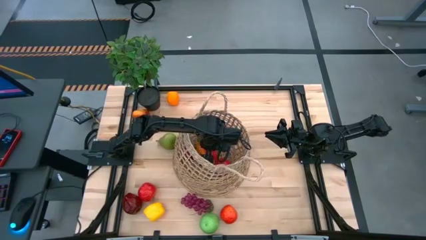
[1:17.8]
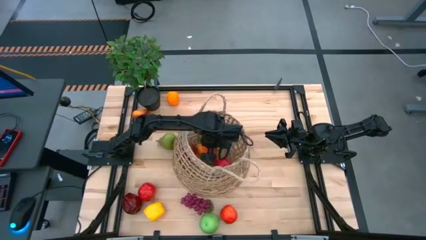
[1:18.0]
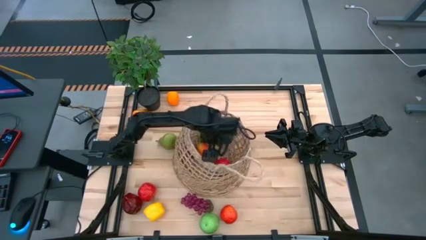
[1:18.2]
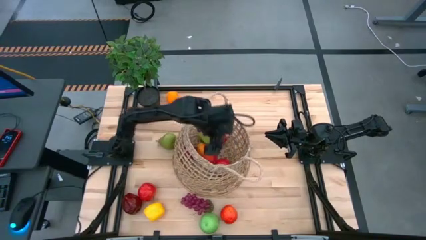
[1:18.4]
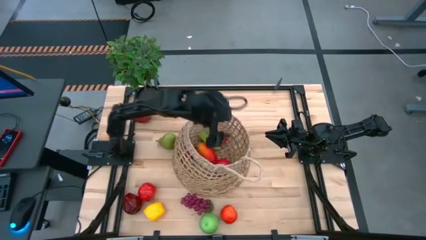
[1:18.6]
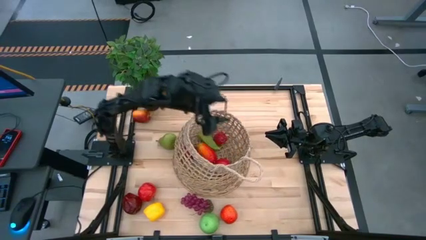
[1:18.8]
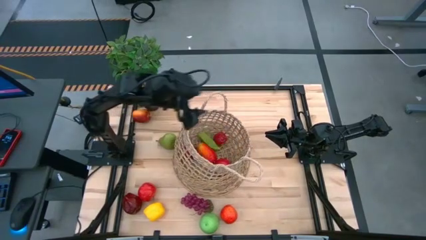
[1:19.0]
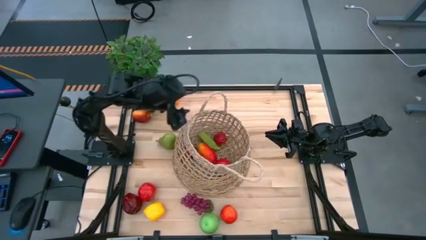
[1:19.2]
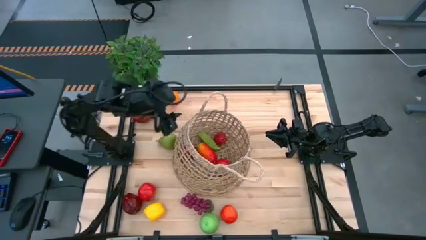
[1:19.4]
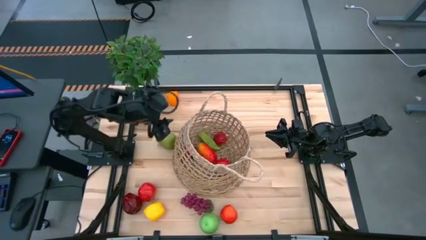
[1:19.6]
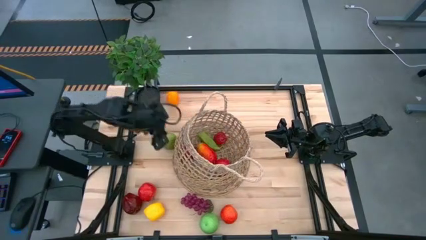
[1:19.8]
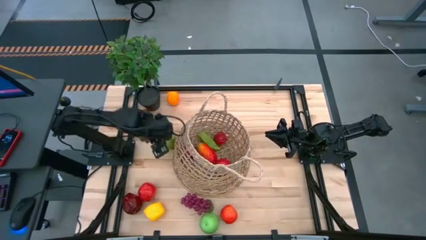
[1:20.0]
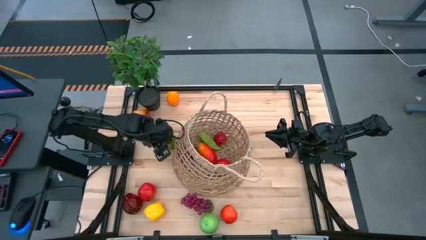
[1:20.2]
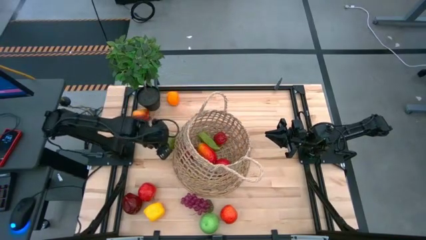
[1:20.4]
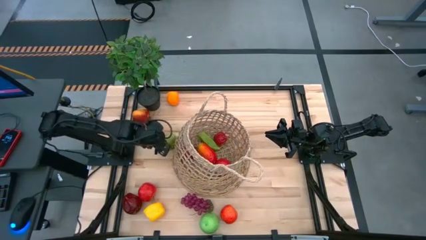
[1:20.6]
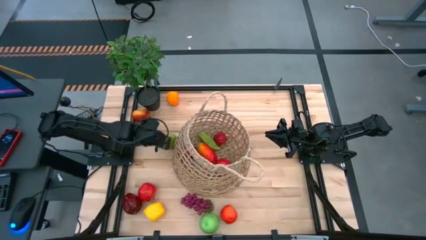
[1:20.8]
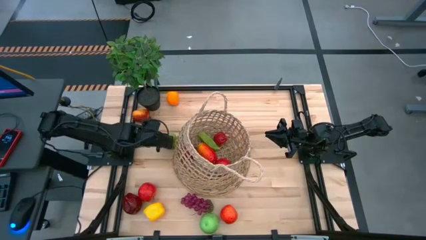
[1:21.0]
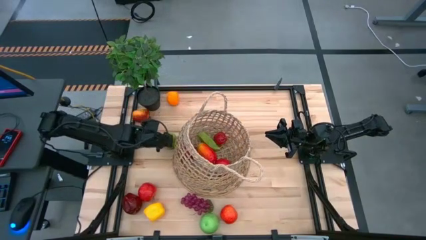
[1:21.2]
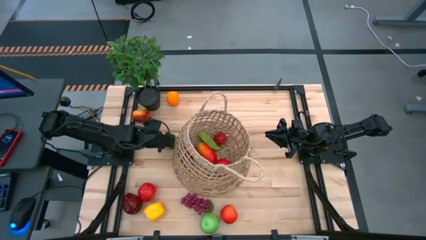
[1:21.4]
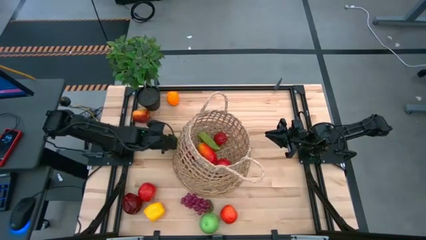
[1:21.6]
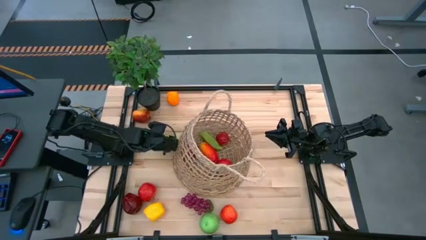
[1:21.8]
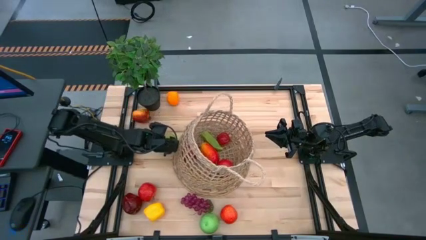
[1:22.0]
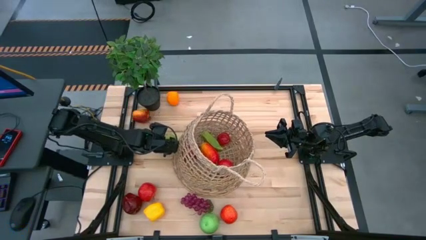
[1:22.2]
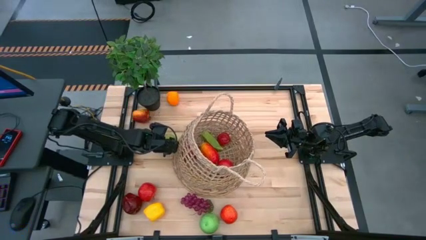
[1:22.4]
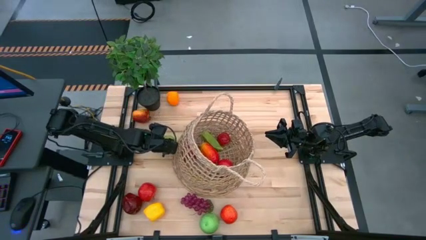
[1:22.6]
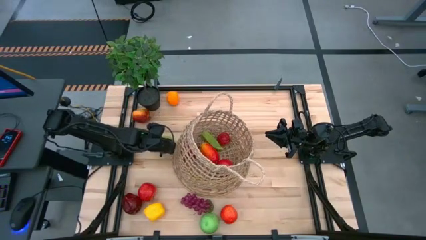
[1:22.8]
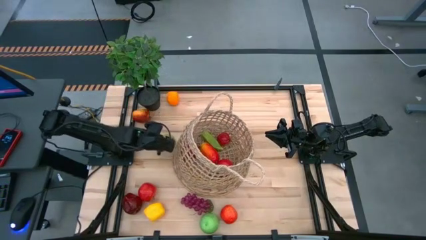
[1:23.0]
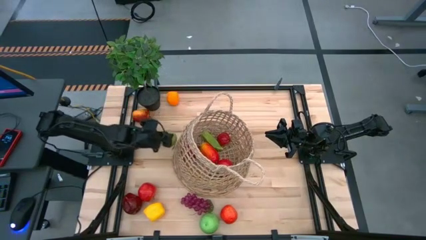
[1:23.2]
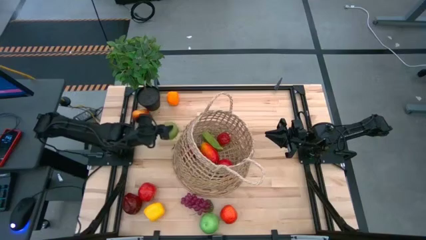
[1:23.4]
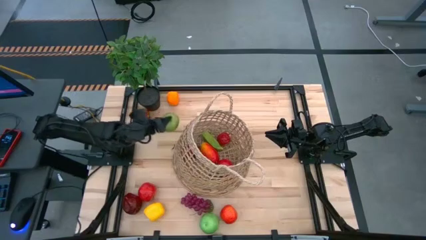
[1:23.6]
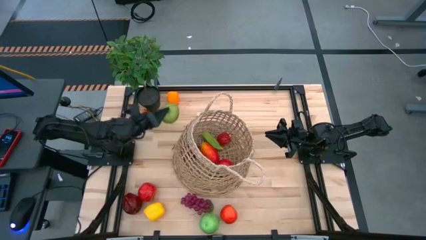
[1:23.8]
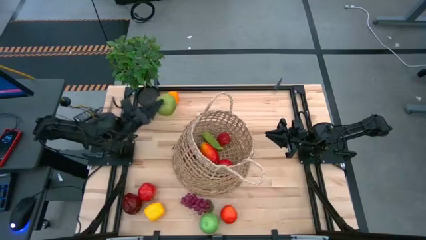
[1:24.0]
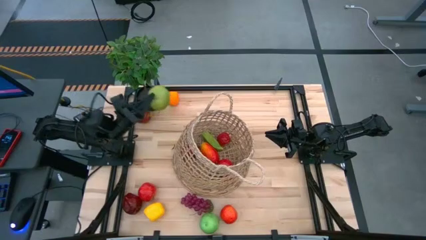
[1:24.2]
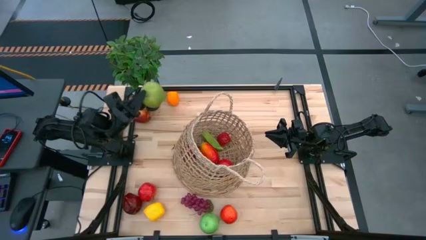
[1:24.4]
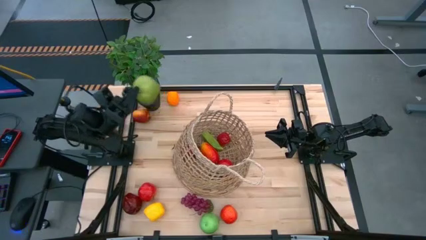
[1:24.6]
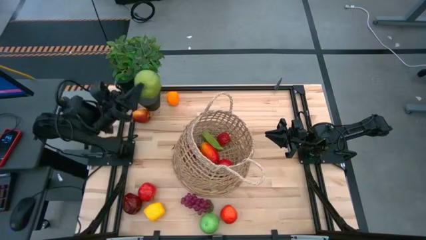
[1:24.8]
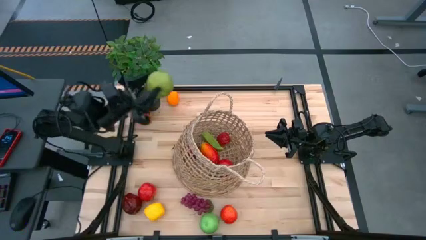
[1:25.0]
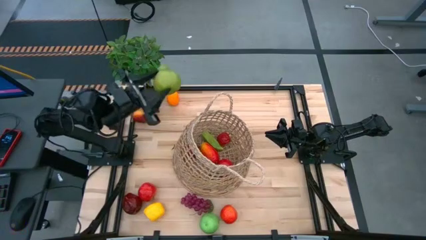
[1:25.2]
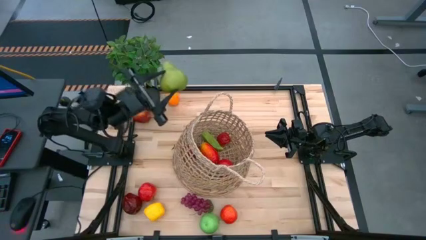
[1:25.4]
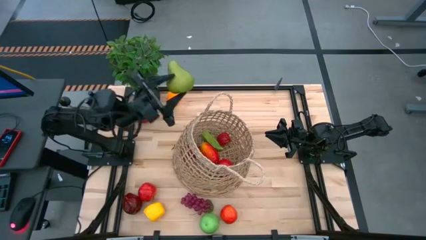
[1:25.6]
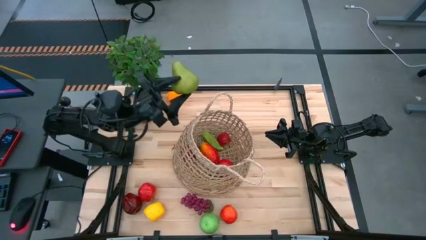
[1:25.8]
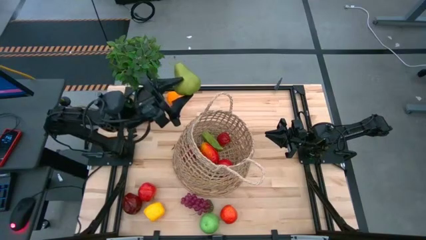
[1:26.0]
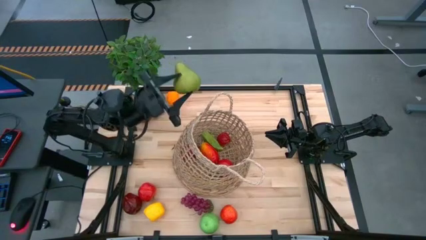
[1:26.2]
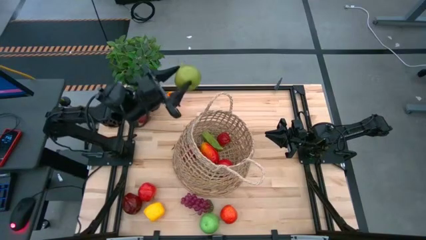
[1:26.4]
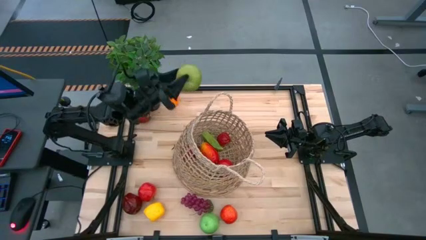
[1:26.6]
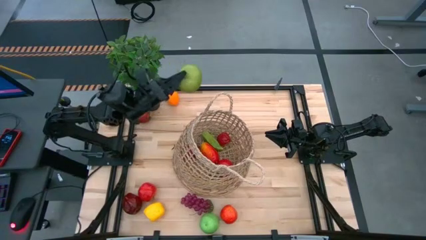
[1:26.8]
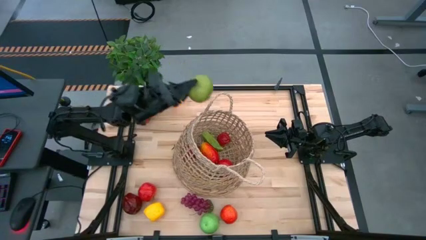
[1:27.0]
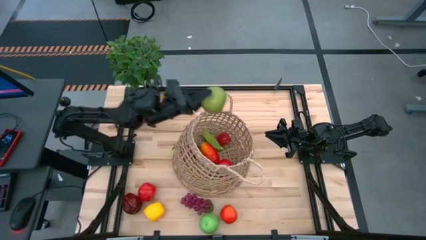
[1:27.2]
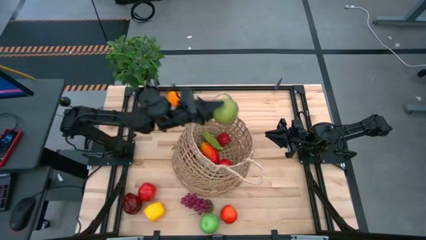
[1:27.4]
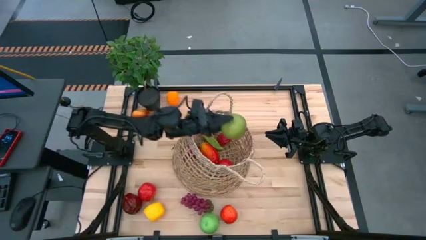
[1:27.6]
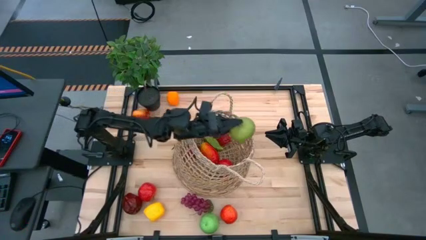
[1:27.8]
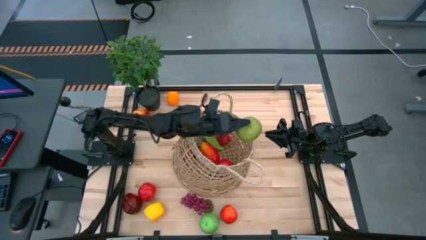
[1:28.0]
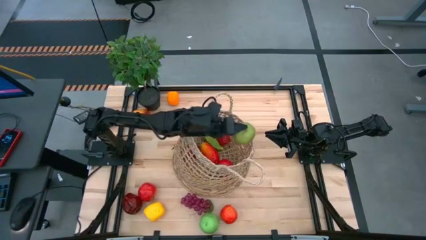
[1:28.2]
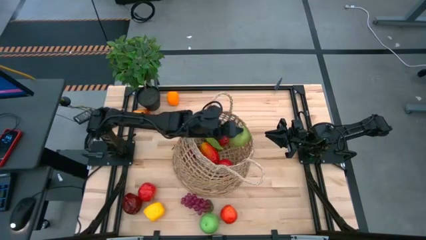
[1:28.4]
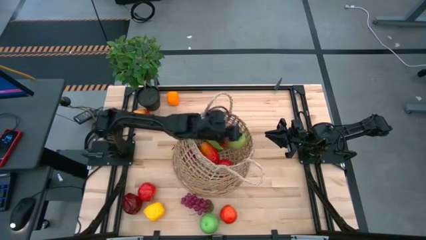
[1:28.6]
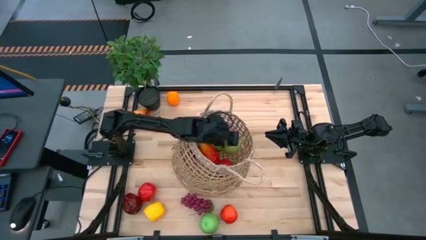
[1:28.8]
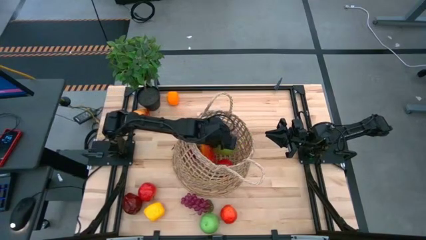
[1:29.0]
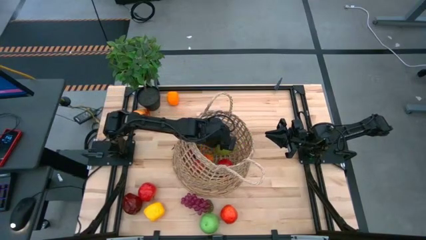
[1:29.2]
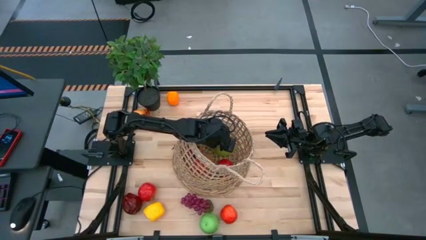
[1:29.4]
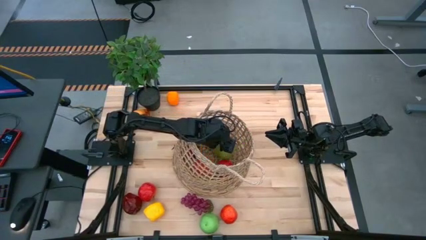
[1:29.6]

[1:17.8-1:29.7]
Task: Build produce basket
Put the pear into the basket

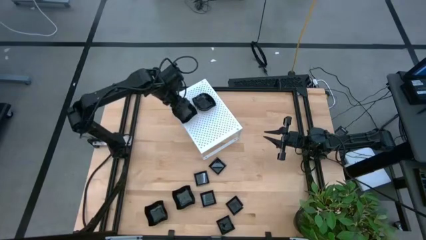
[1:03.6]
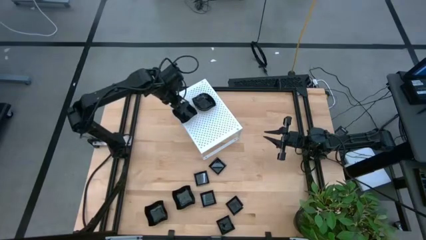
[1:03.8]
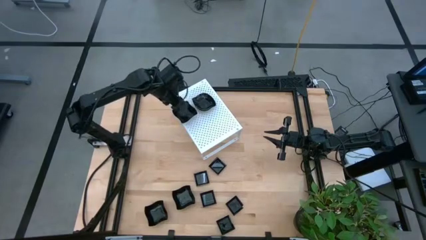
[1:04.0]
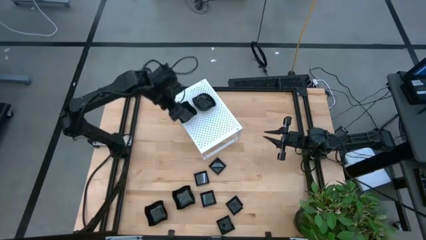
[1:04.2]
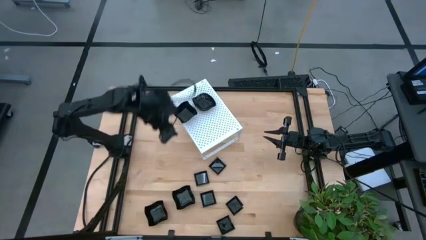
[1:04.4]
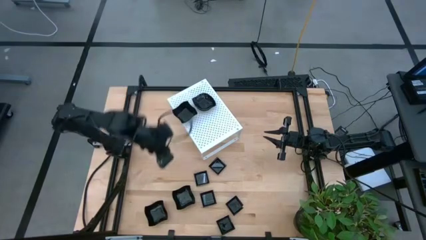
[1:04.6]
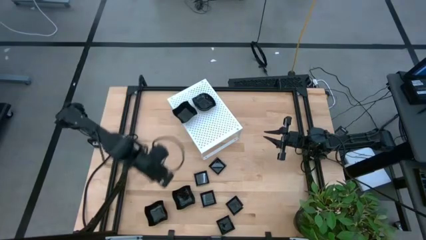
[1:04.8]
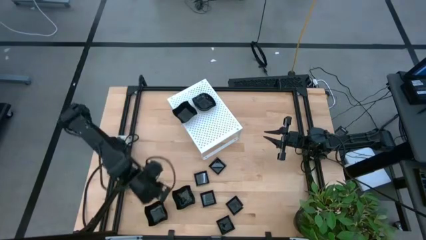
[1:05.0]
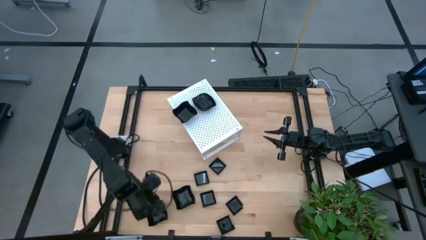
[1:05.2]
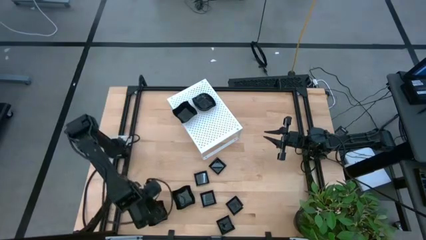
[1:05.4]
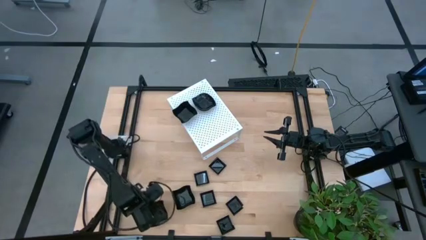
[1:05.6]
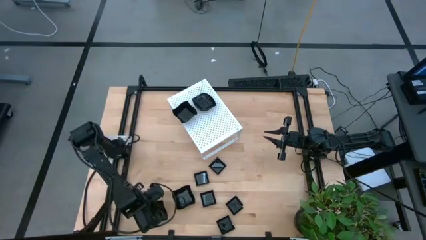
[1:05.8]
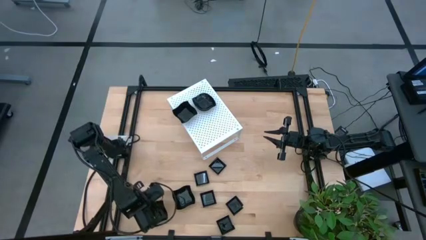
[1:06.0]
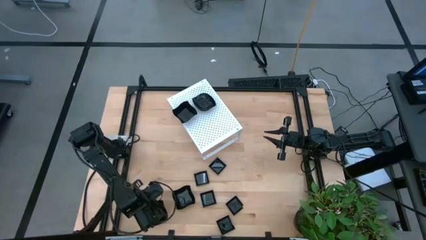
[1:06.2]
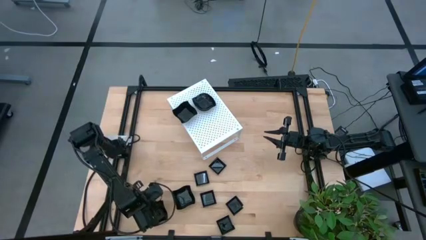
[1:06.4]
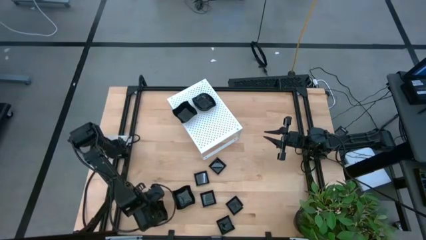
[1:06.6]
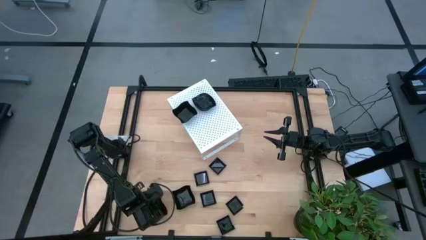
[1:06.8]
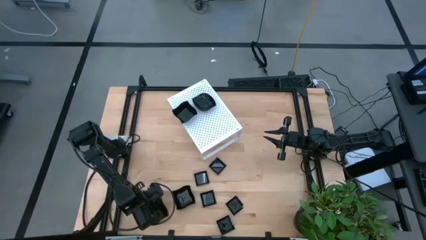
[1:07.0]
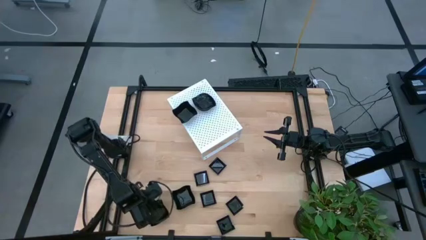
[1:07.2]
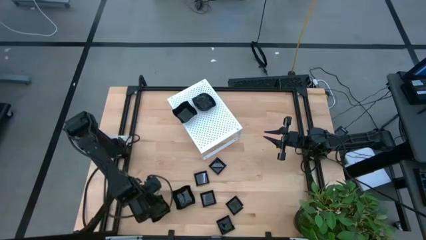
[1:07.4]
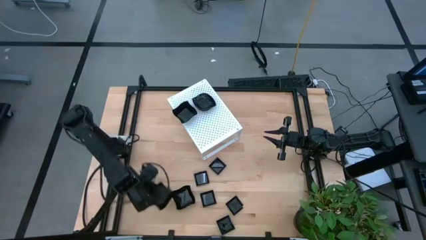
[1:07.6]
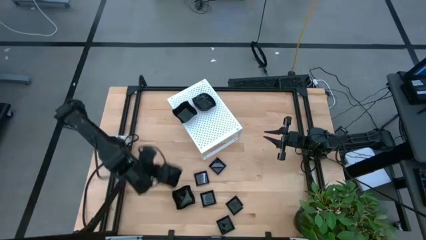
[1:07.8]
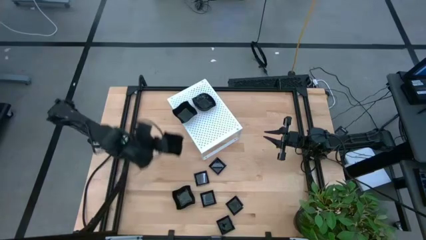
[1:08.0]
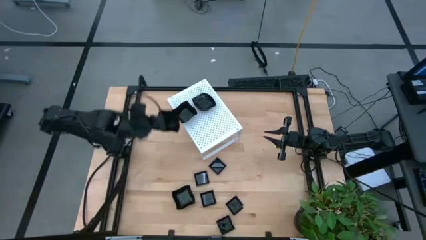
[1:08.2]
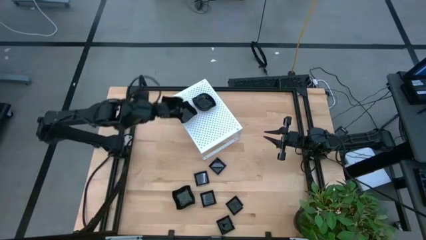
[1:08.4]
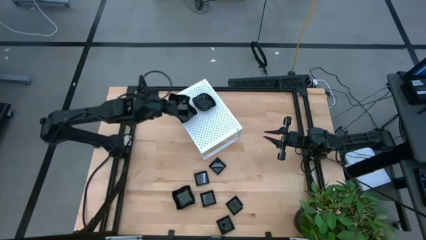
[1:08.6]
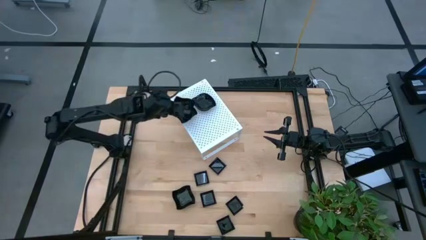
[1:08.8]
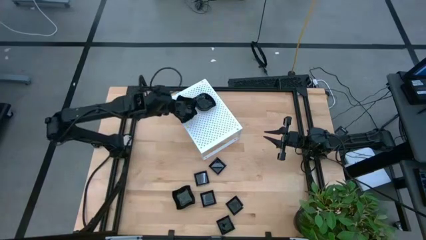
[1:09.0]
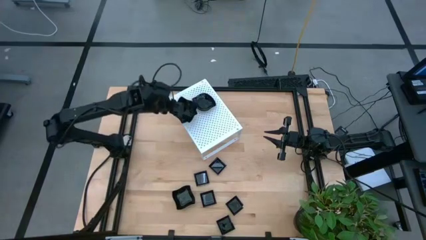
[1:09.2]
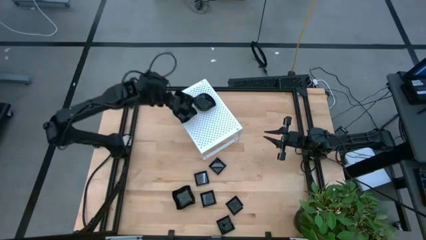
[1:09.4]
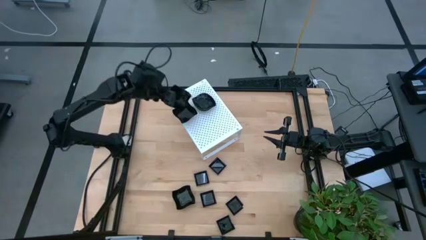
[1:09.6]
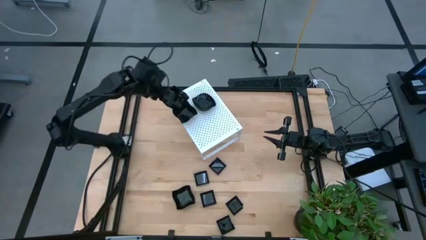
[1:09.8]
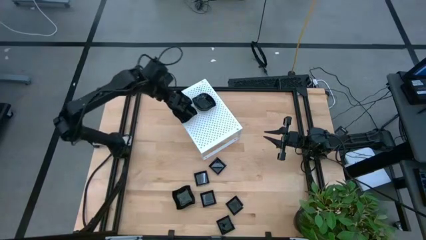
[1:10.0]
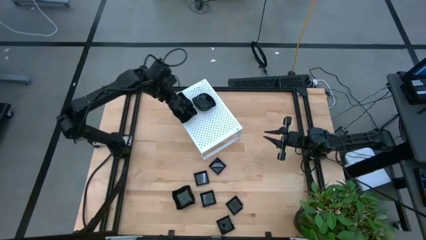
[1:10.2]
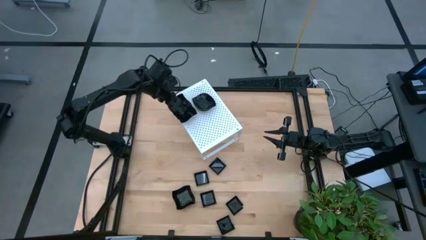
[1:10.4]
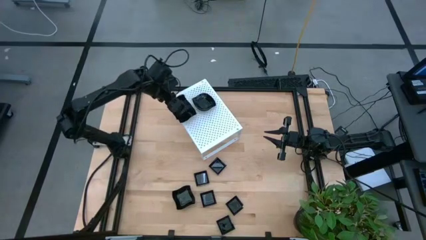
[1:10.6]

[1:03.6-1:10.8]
Task: Pick & Place Mini shaped plates
Stack the distorted square plate on top of the stacked distorted square plates on the shelf
